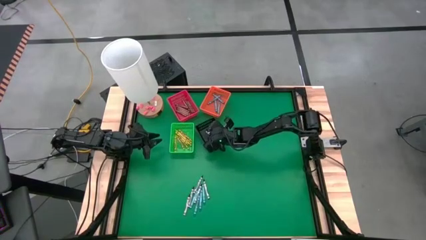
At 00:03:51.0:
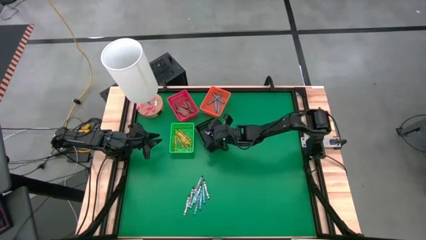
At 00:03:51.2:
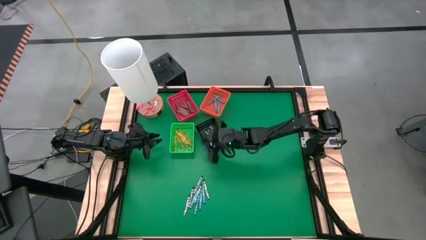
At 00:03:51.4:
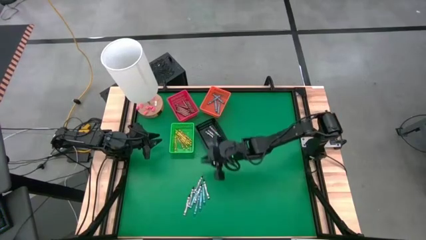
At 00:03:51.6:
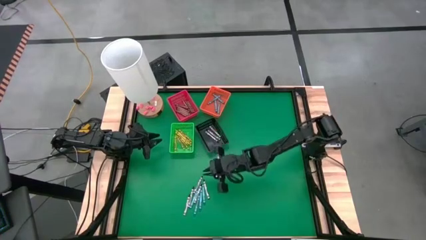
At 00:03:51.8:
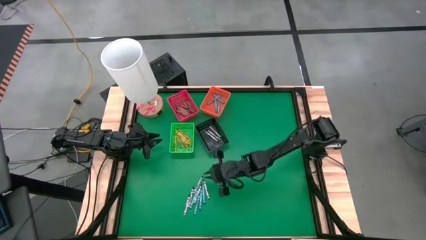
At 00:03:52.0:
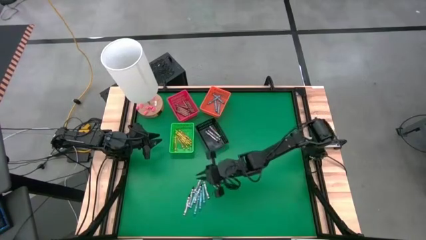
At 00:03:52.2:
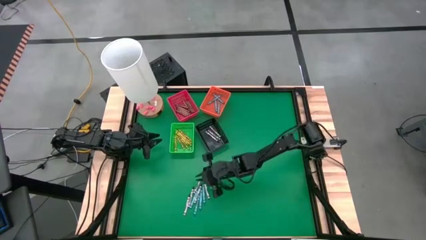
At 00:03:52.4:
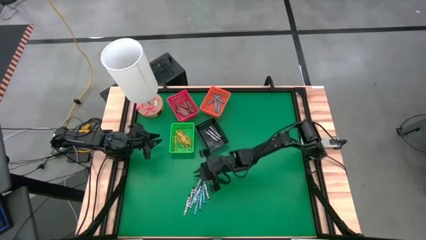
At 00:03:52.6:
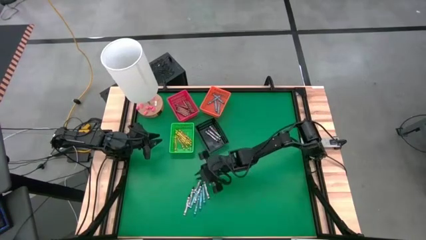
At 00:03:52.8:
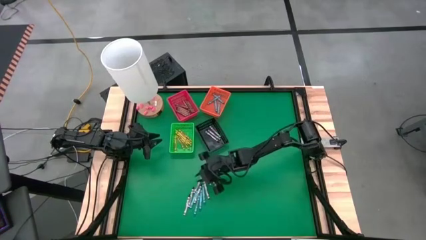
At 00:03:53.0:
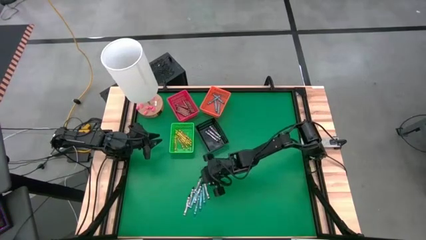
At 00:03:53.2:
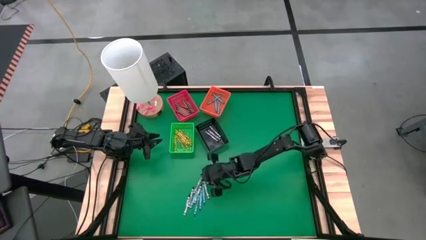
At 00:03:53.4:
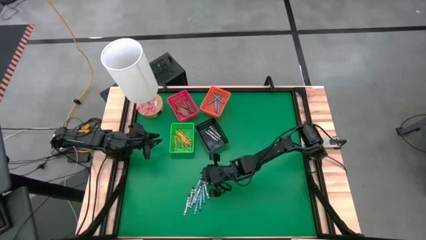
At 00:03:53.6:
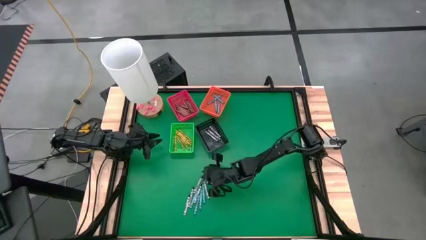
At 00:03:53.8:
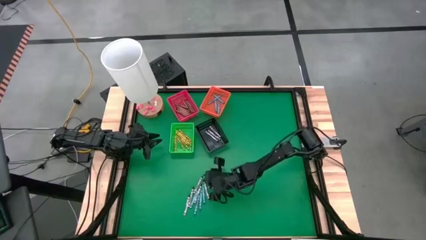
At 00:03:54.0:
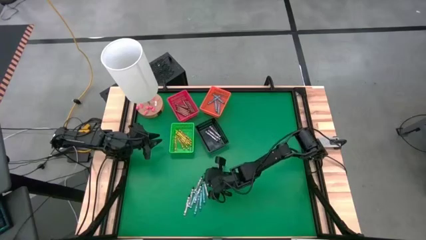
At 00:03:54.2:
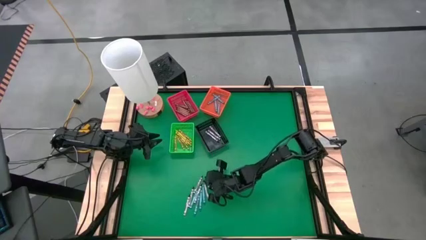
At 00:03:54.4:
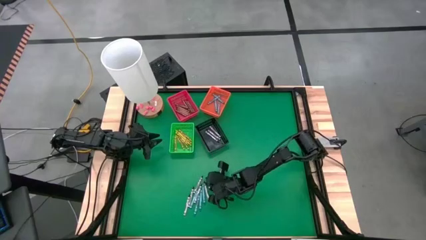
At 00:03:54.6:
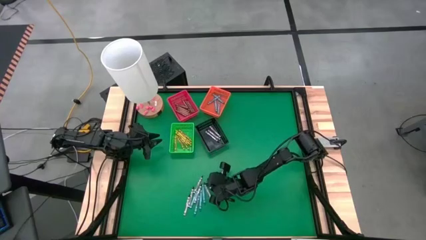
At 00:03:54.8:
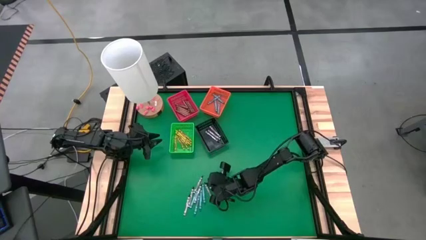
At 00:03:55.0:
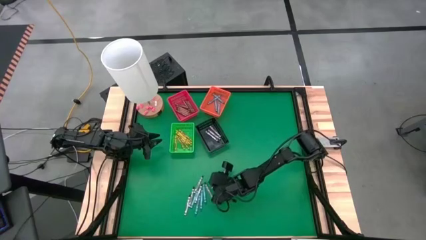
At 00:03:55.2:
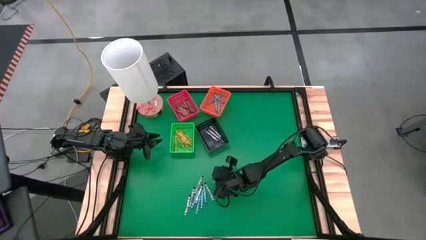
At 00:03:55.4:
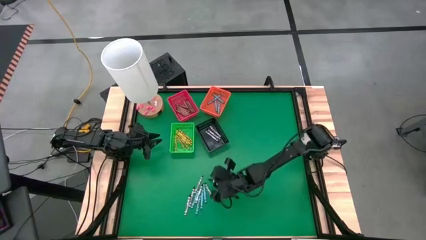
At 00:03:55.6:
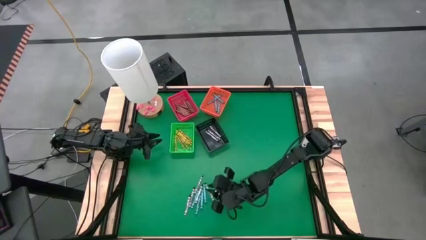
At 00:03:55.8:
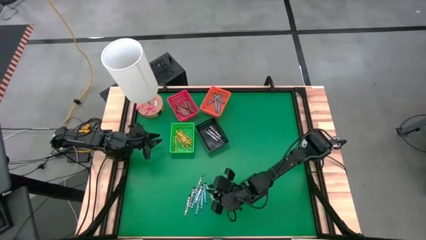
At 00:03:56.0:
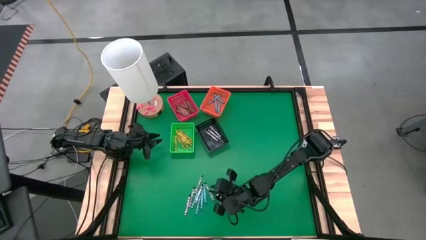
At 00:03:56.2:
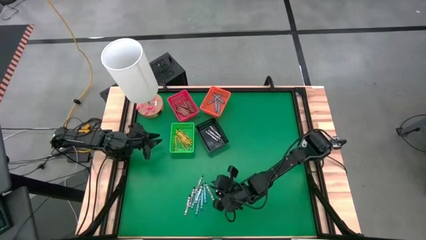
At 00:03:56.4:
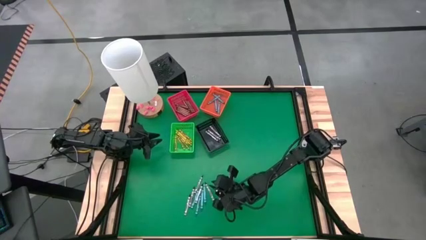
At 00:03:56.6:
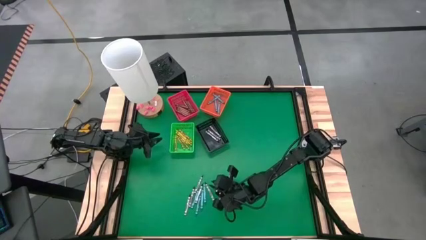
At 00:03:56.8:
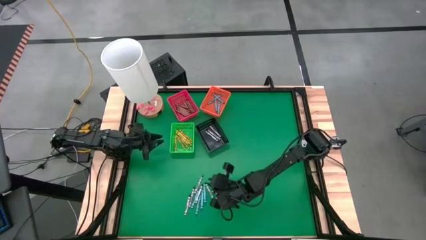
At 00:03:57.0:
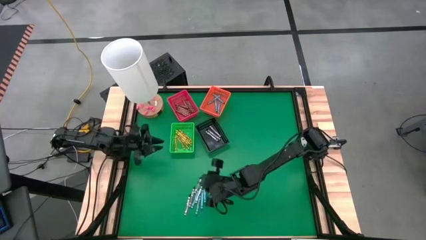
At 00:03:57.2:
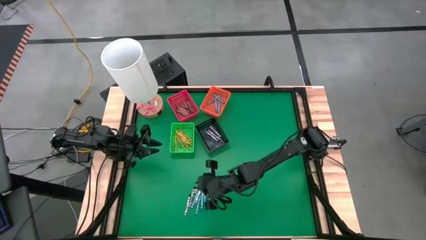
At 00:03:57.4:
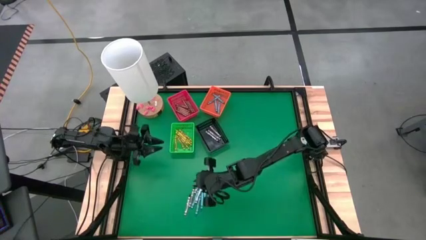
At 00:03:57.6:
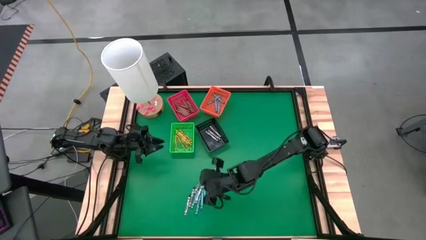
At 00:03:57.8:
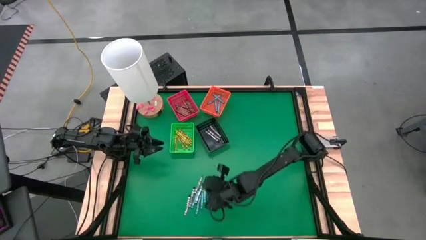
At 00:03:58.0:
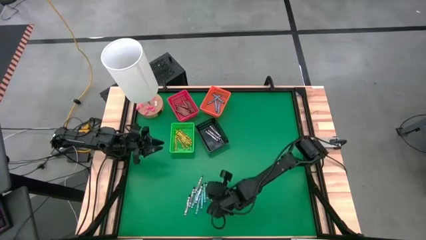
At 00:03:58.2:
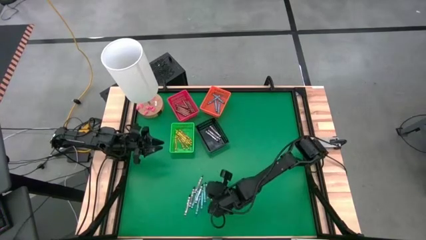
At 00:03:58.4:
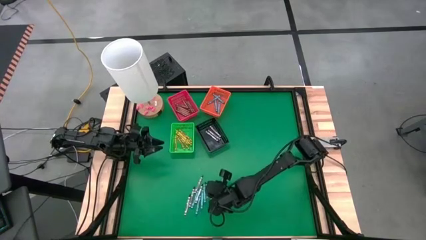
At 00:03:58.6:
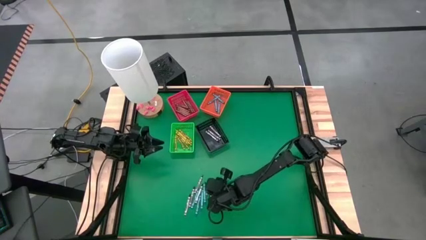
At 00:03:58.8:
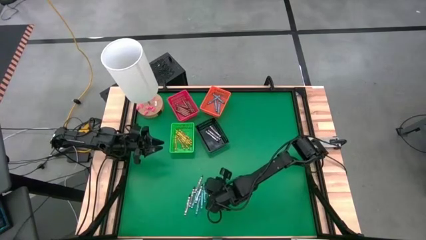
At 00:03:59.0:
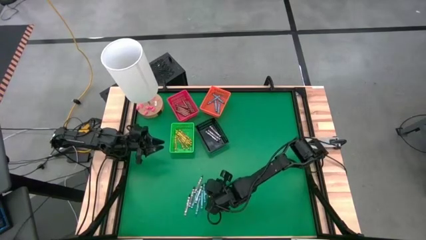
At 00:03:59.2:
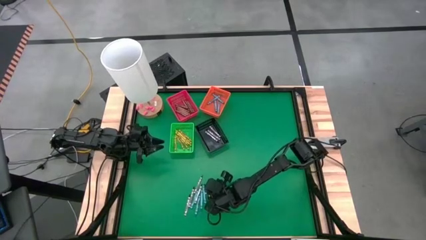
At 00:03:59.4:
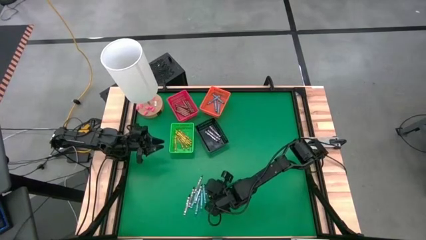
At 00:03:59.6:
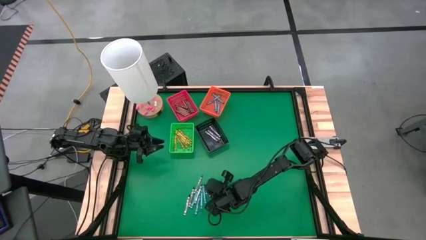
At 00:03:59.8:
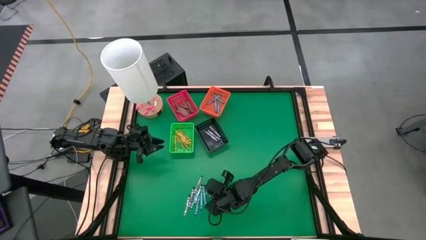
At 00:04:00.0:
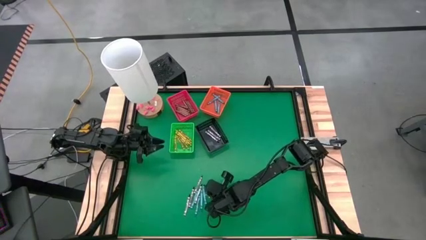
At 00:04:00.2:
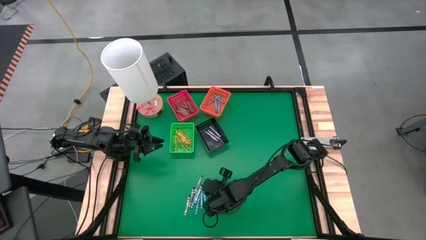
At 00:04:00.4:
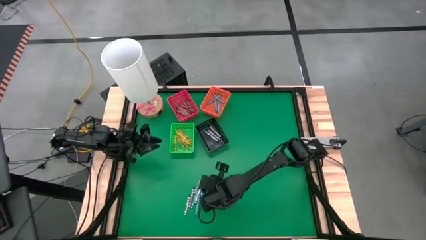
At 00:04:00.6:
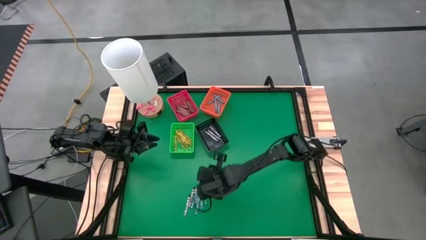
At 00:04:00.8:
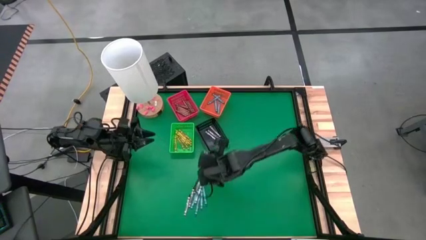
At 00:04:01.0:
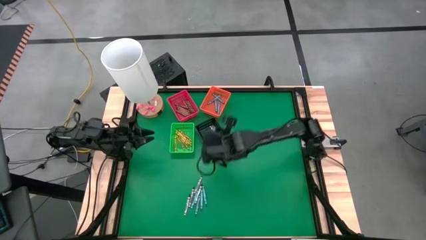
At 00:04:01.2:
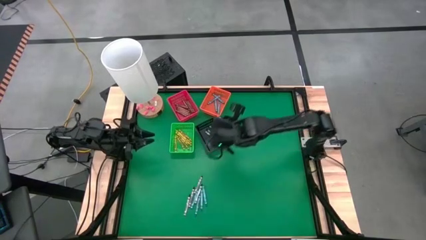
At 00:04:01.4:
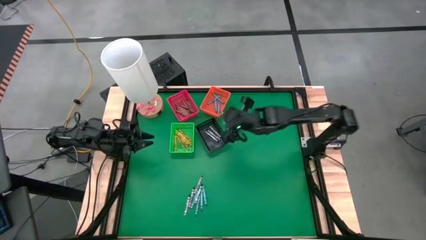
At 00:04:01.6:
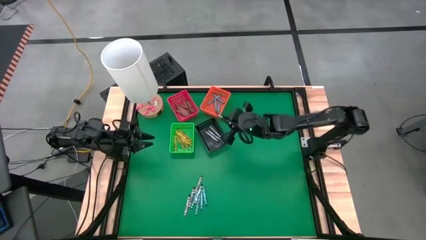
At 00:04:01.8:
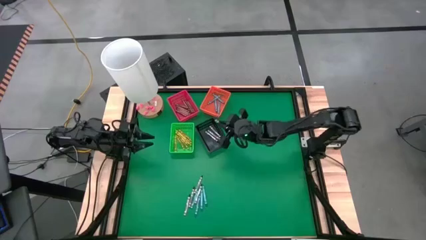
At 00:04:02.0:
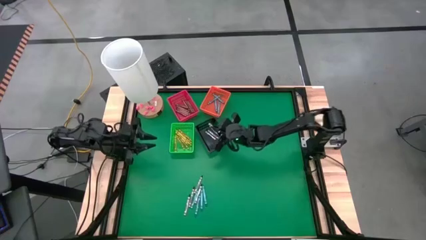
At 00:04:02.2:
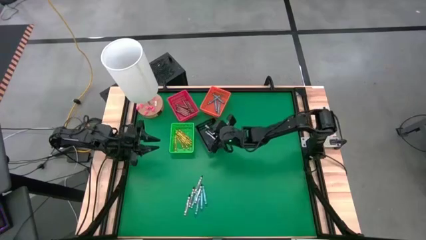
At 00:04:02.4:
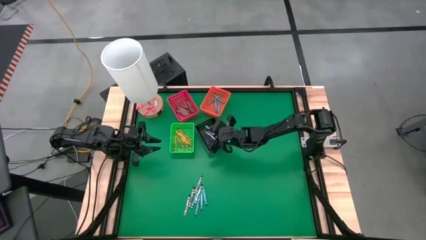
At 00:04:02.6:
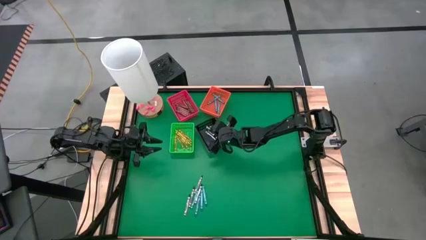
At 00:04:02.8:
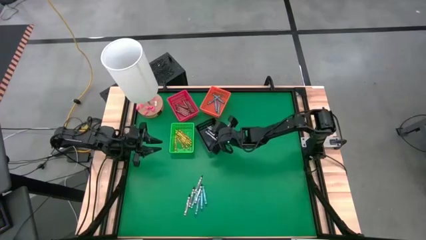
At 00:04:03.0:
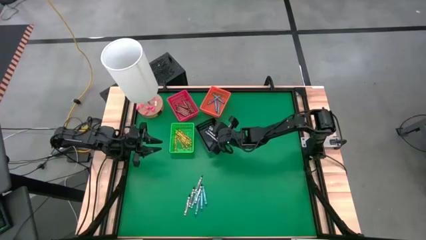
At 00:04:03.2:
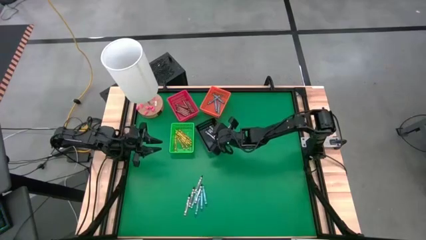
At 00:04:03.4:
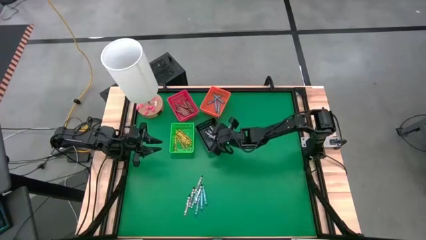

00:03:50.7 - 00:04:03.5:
Task: Sort crayons
Put the black crayon into the black bin

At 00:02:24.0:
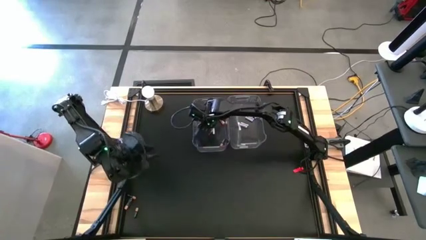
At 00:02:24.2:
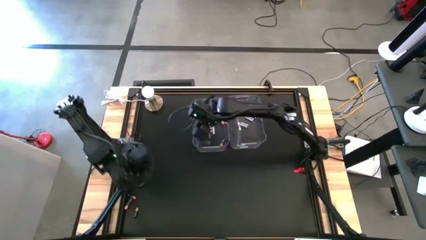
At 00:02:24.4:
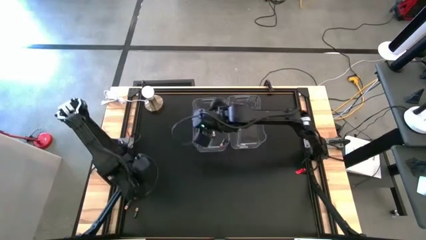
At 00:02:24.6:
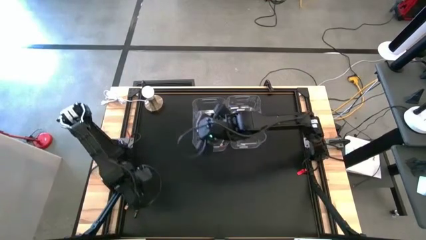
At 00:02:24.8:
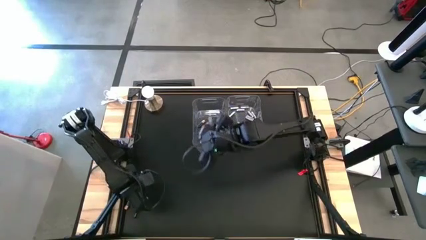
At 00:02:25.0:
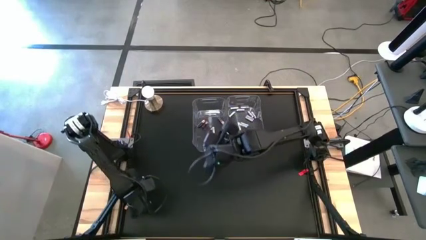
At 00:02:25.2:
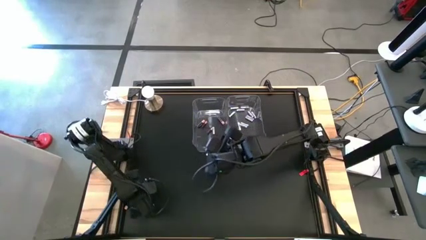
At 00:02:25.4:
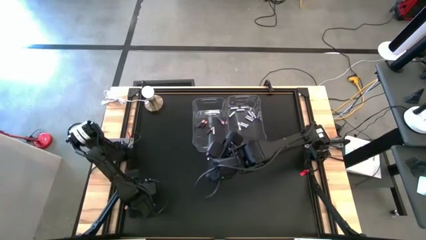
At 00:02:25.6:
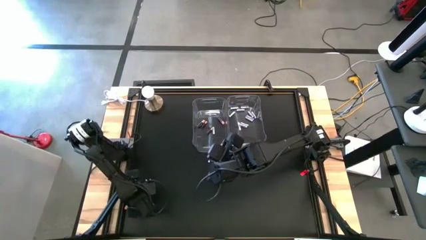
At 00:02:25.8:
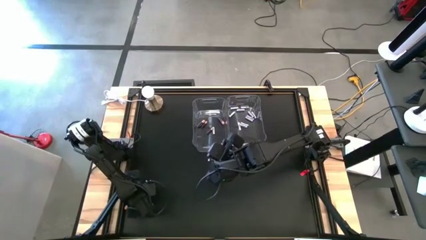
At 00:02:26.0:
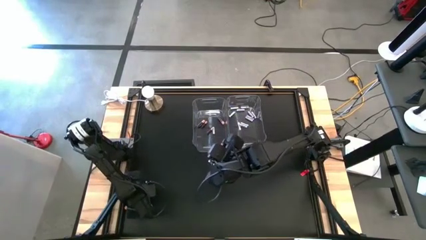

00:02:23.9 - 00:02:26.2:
Task: Sort batteries
Put the black battery into the left transparent bin
